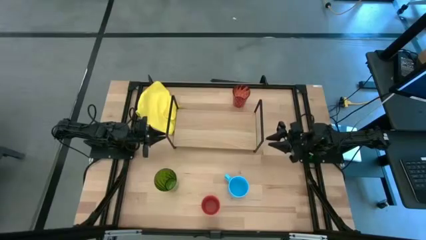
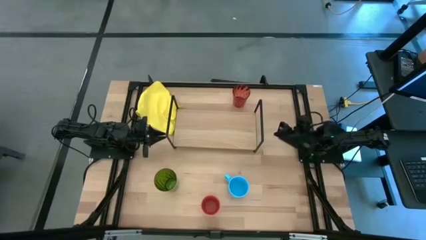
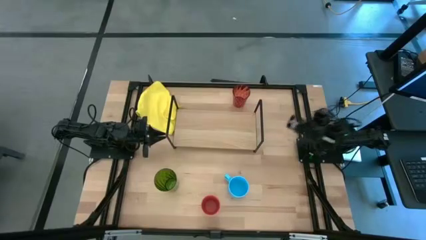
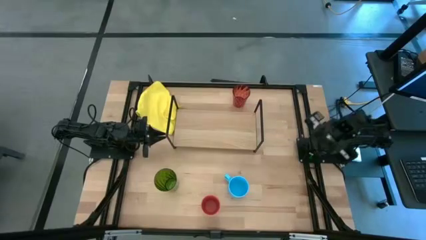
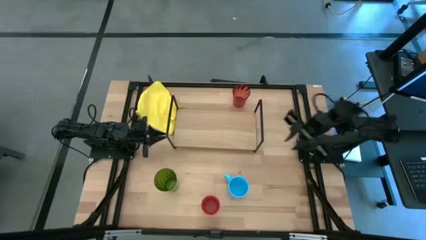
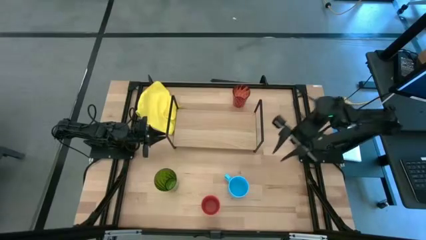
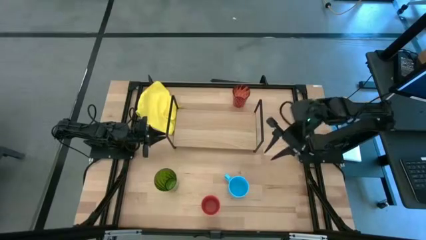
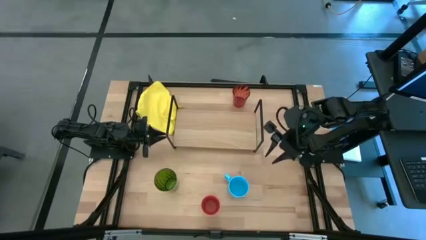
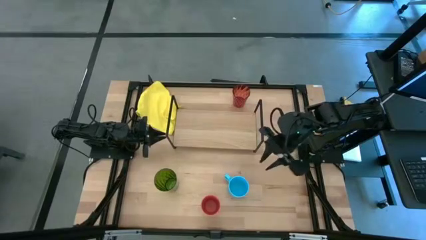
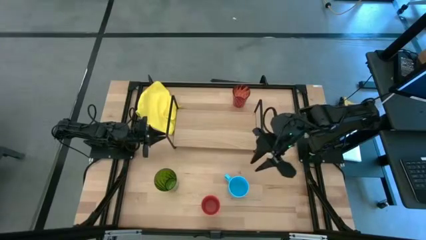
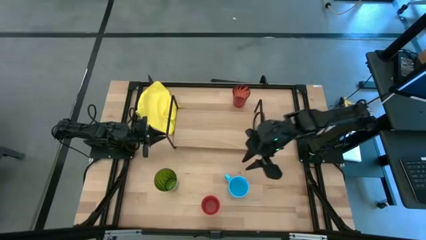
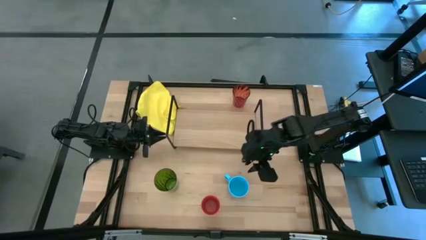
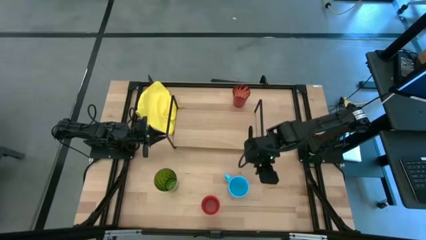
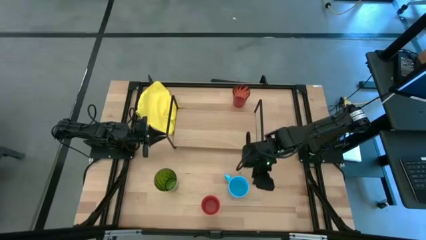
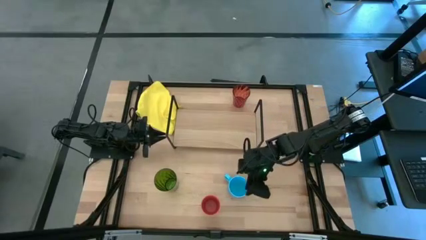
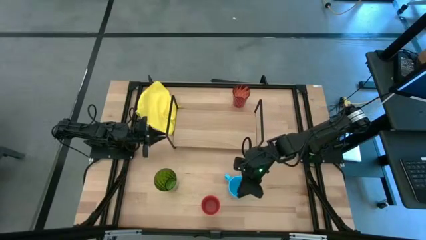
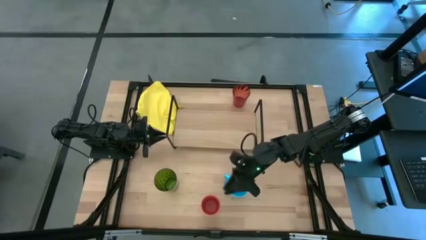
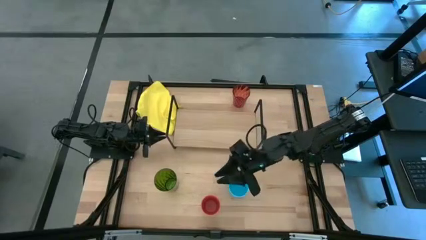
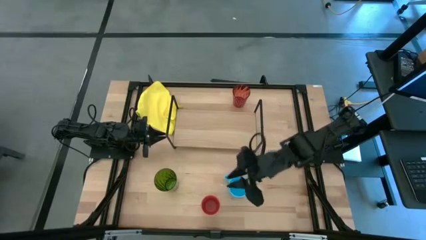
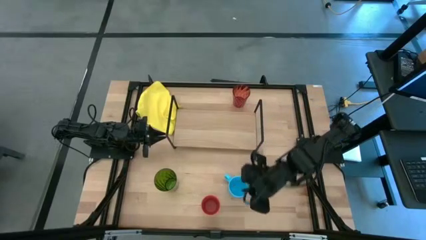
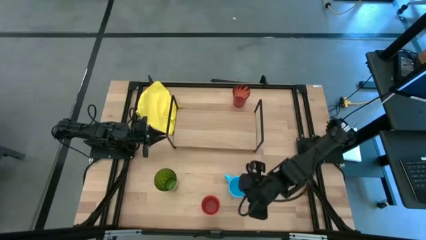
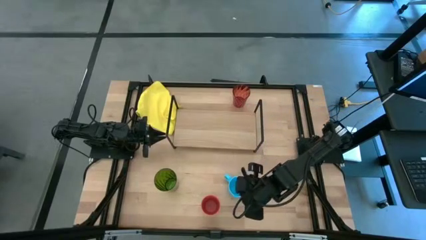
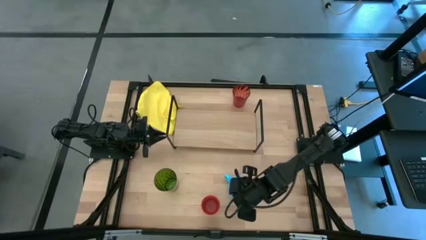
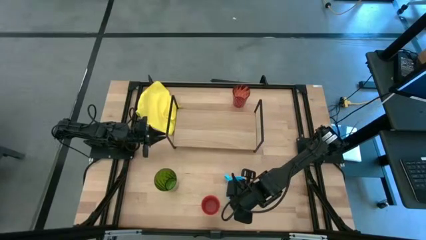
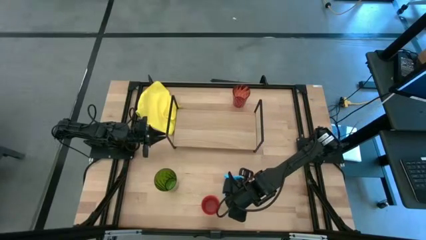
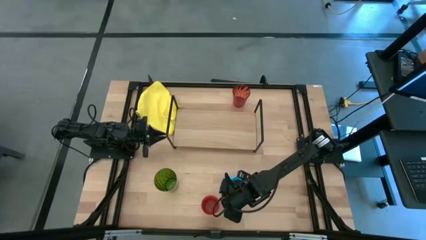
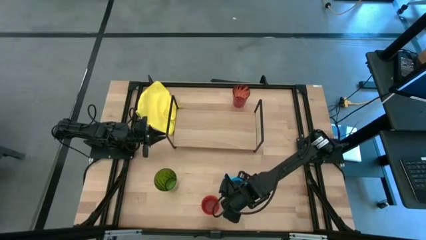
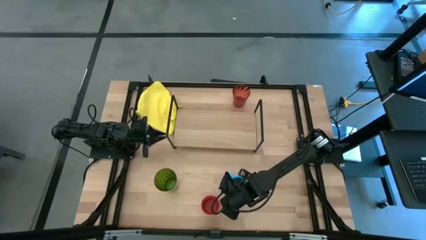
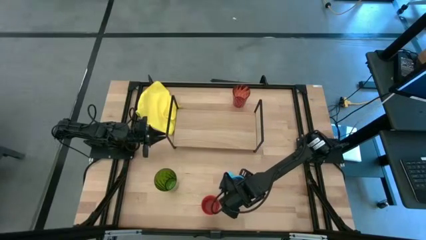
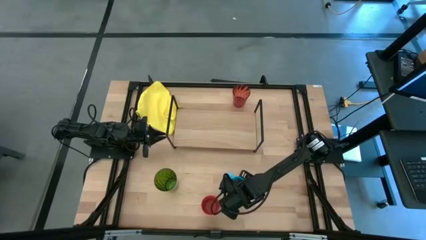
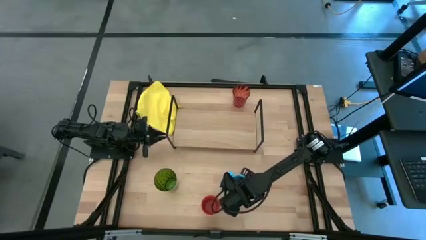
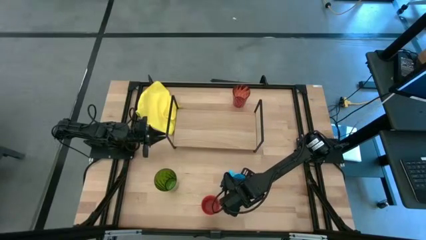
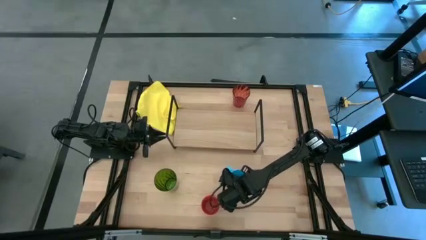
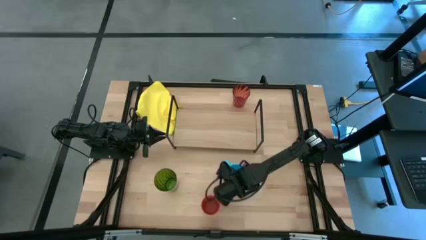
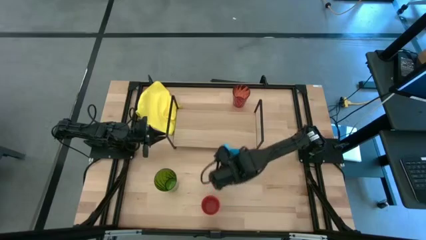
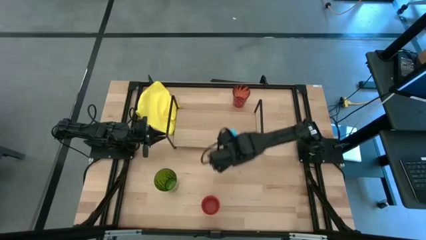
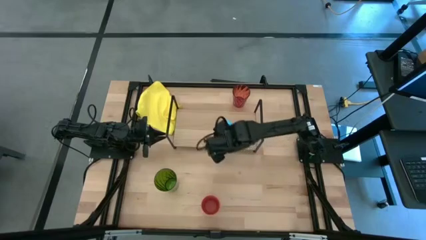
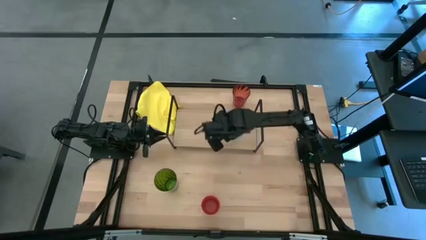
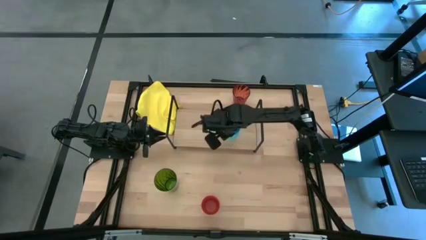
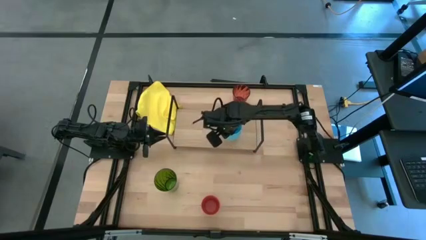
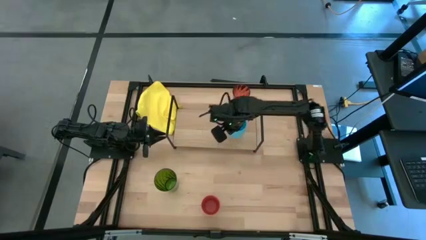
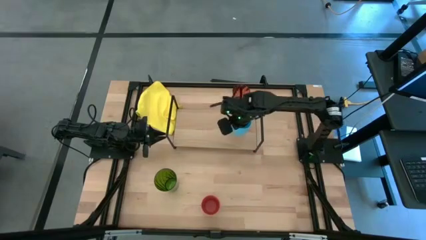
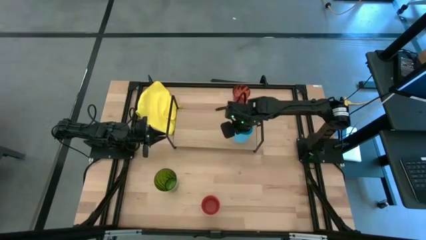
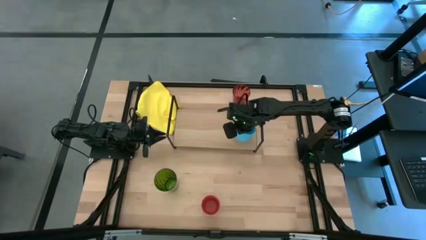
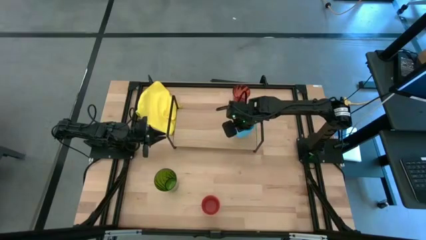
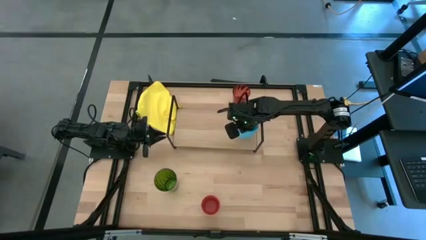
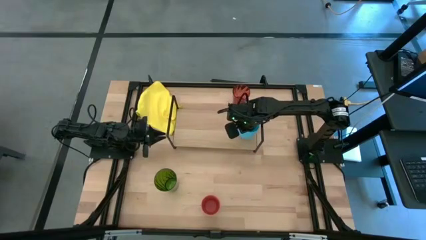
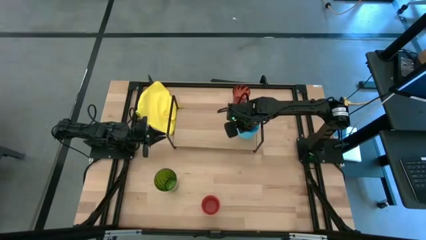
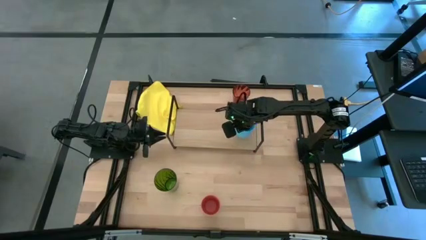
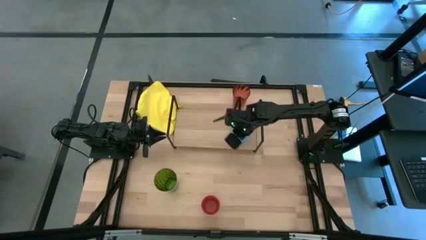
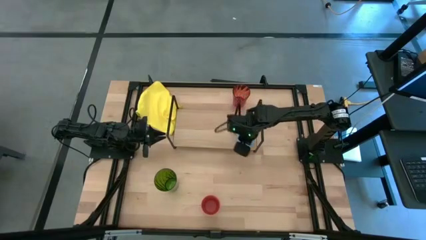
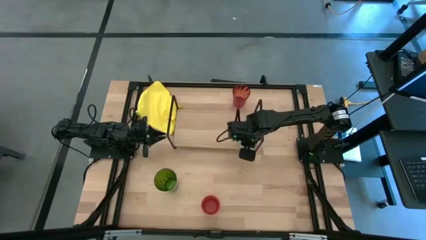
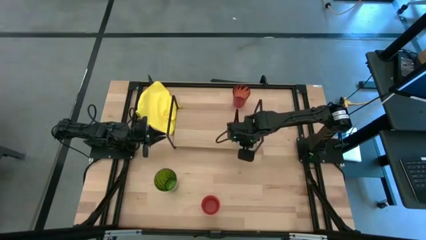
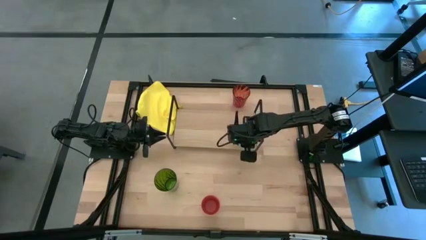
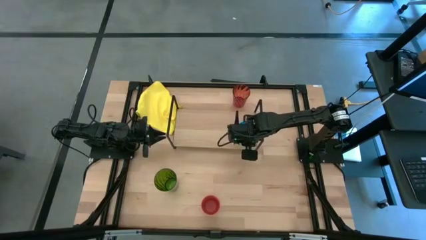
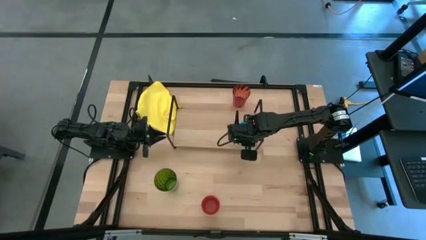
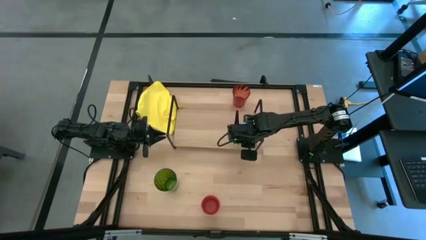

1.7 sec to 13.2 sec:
Task: Stack small to large cups/mugs on shelf
Put the blue mug on the shelf

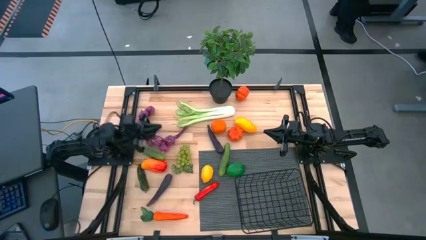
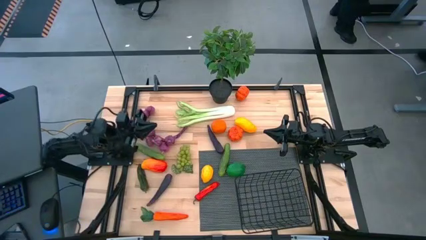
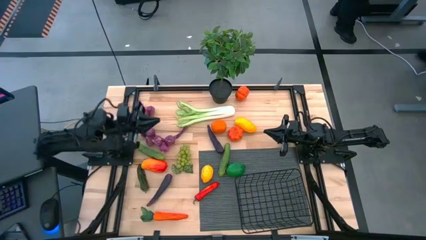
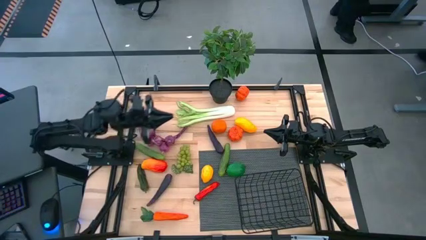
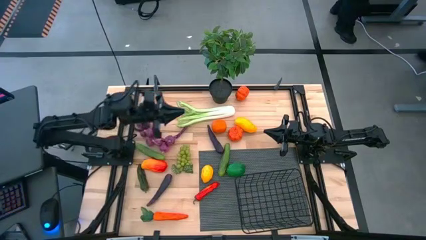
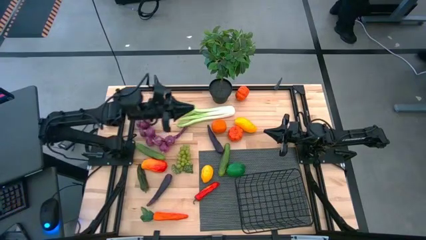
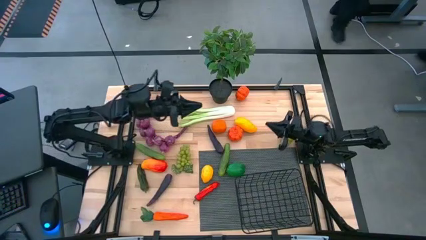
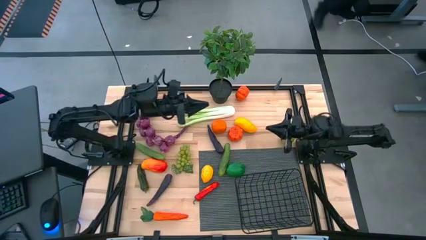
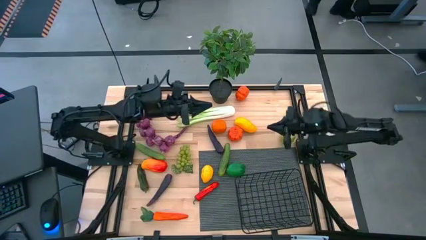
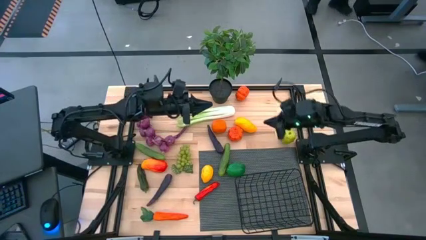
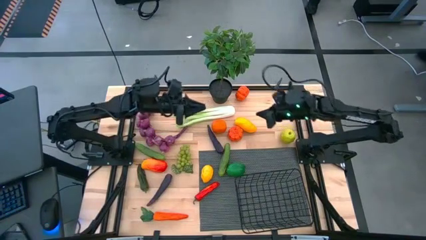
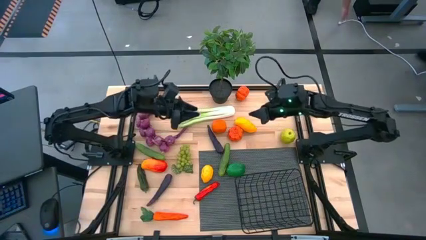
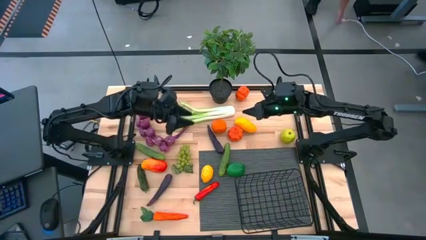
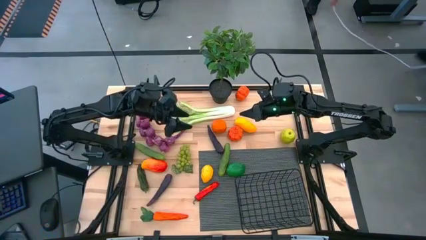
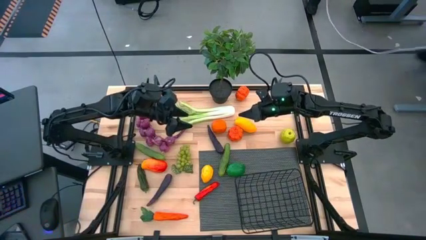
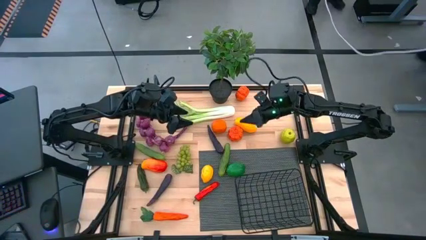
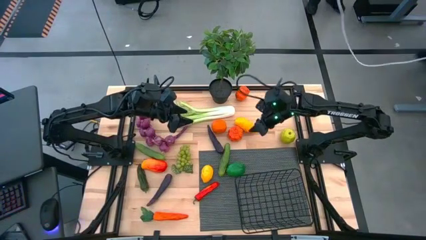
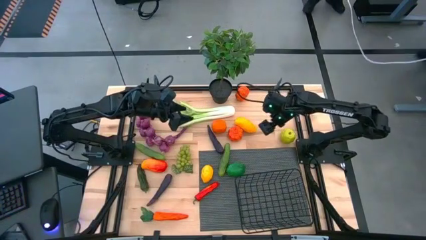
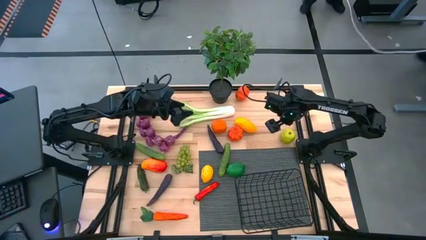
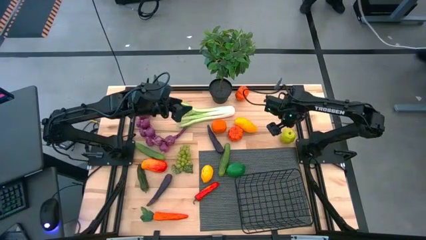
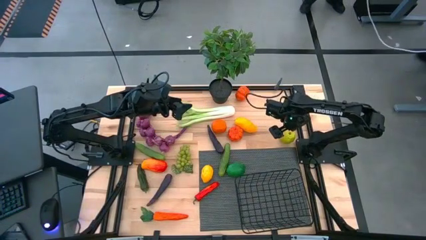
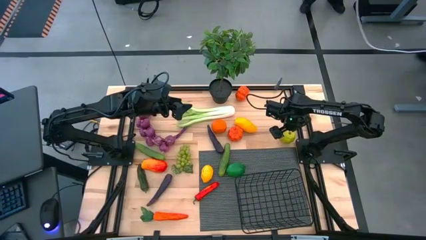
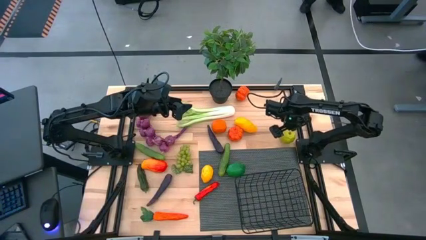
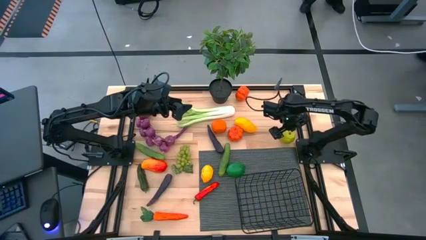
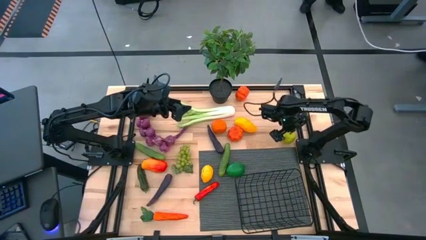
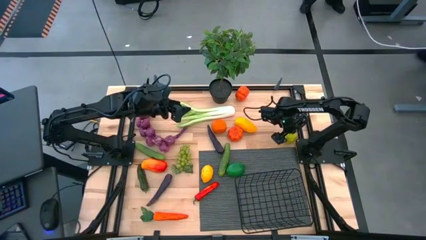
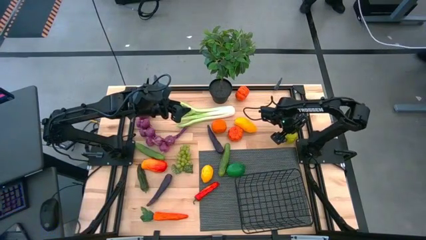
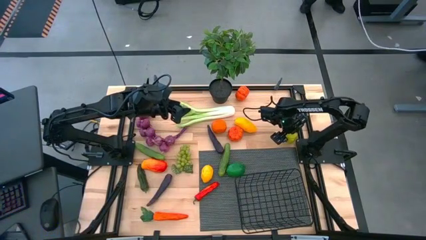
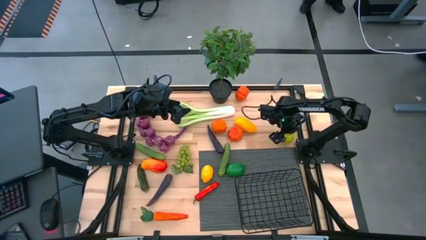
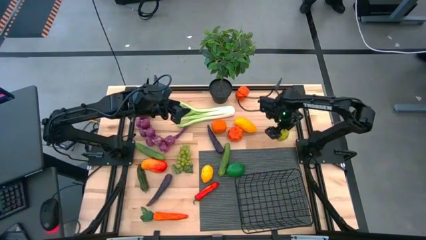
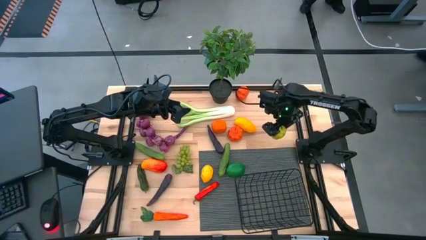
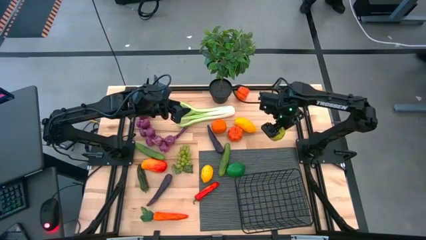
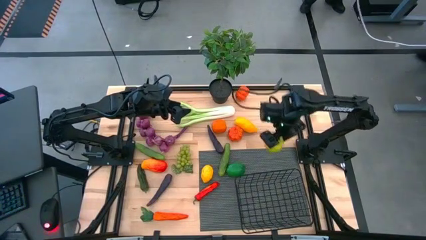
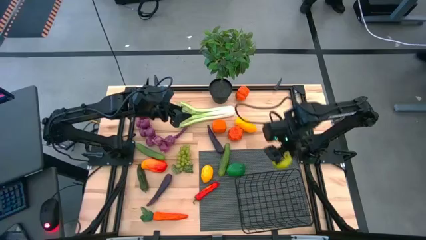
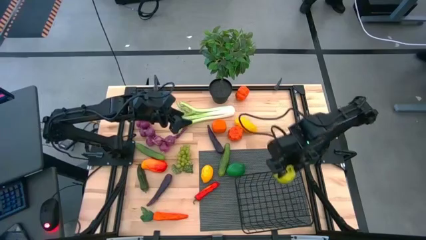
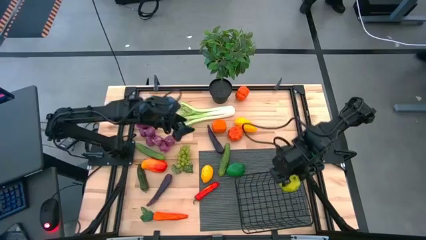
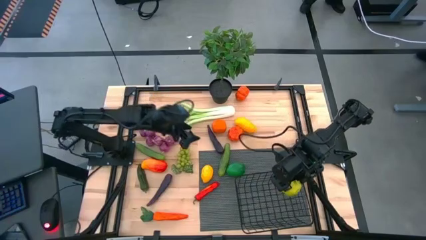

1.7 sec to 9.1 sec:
Task: Build produce basket
Put the green apple into the black wire basket
